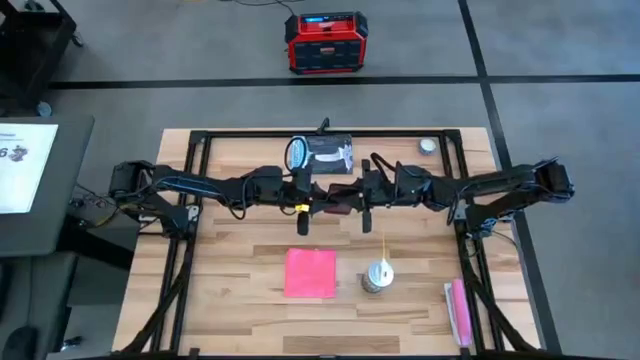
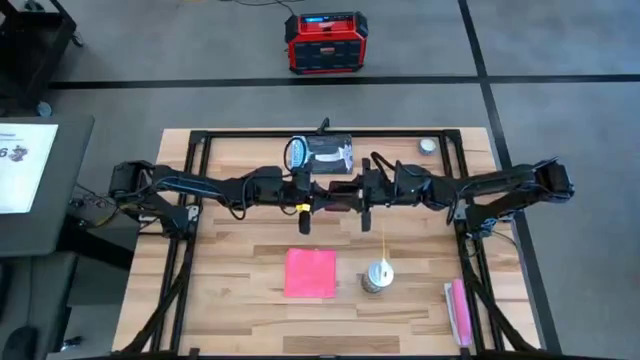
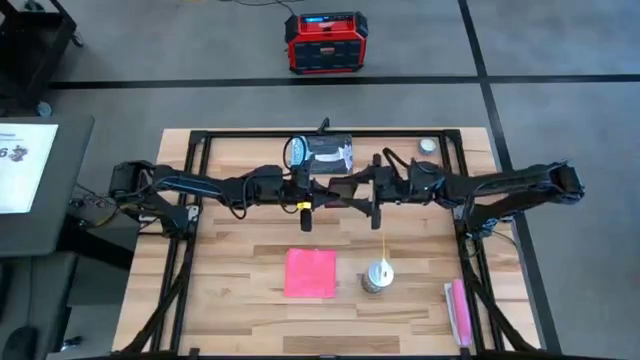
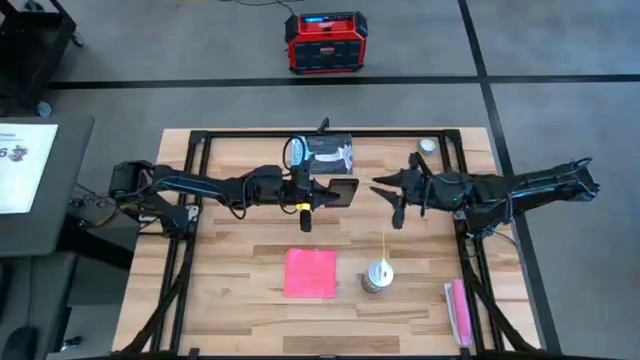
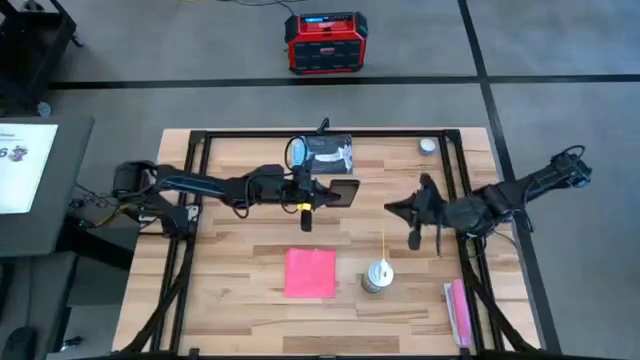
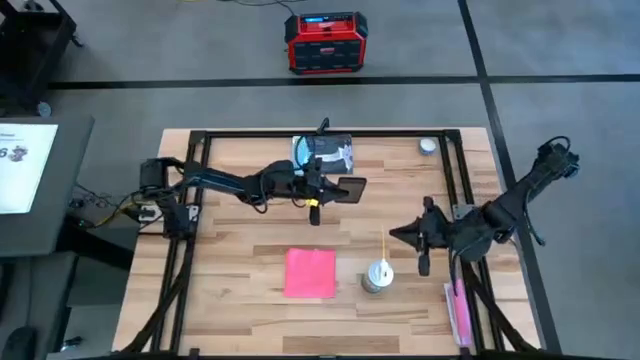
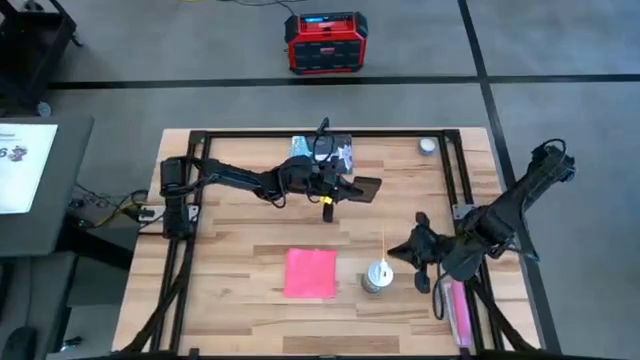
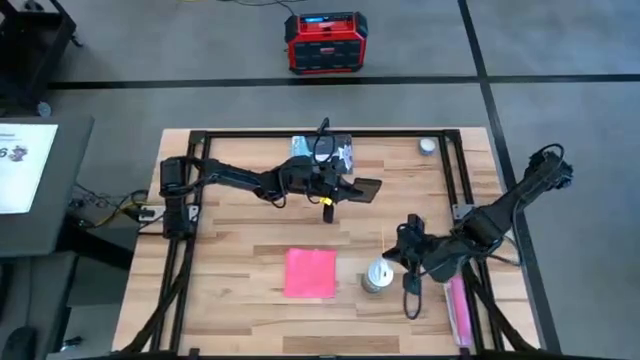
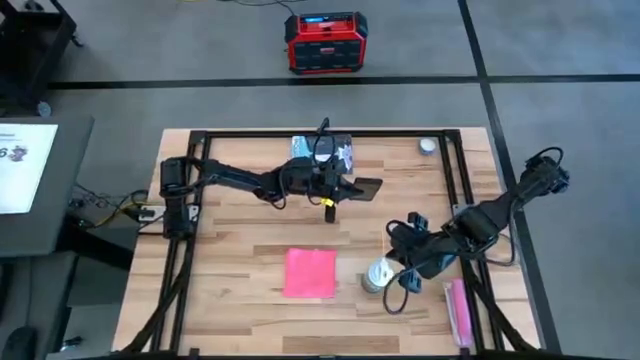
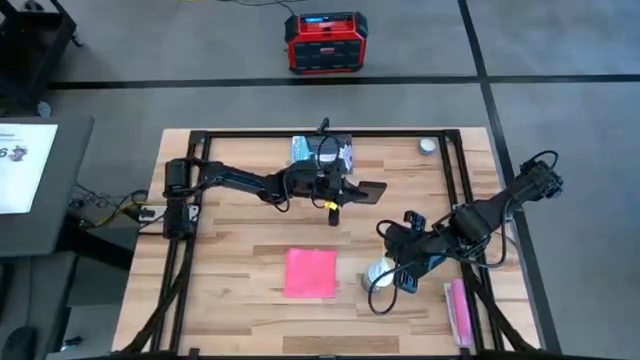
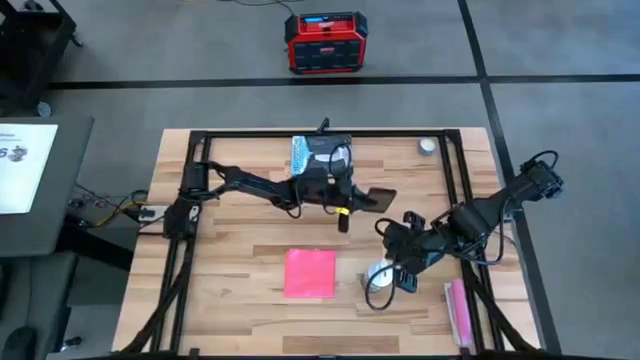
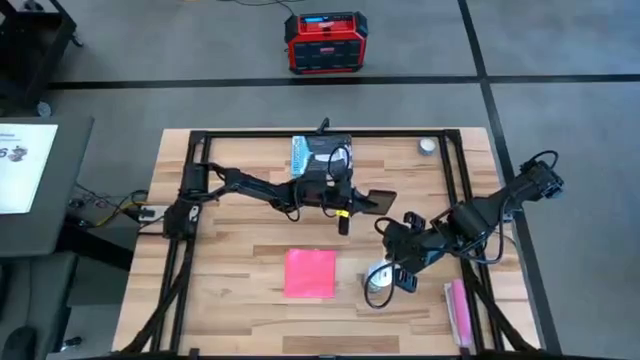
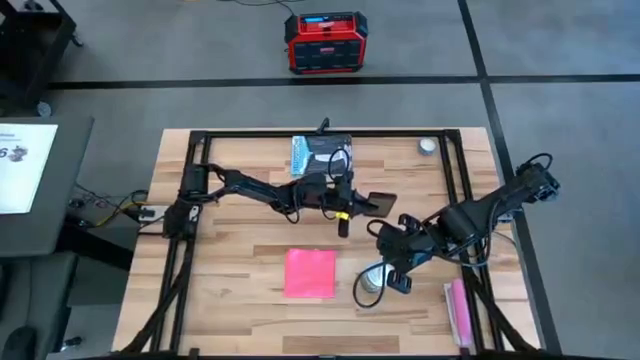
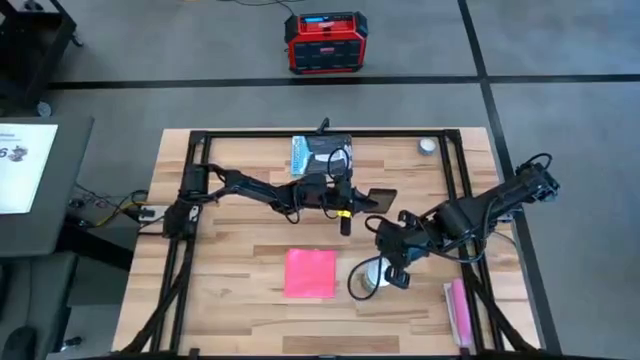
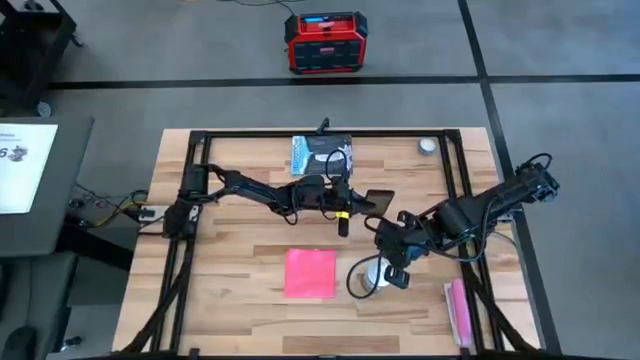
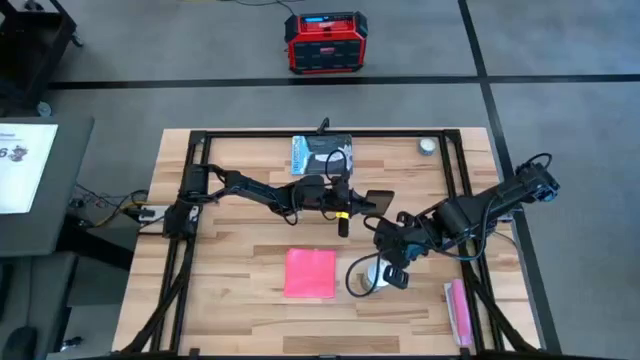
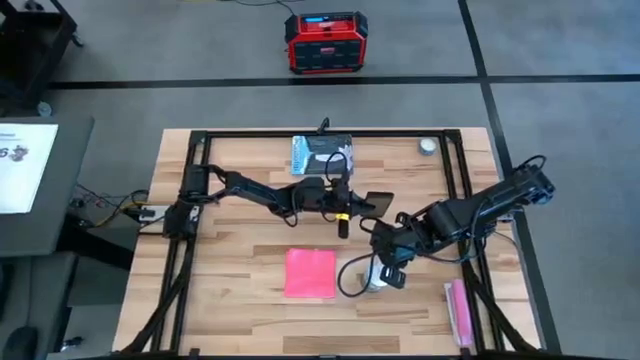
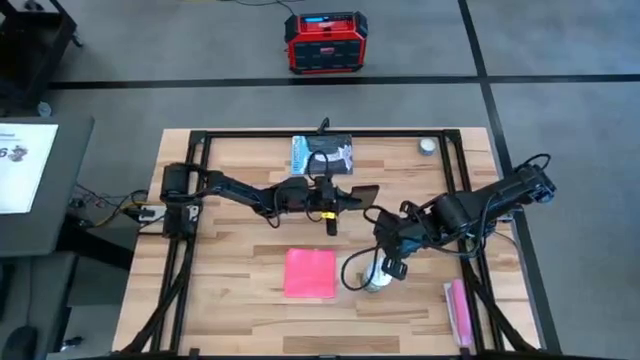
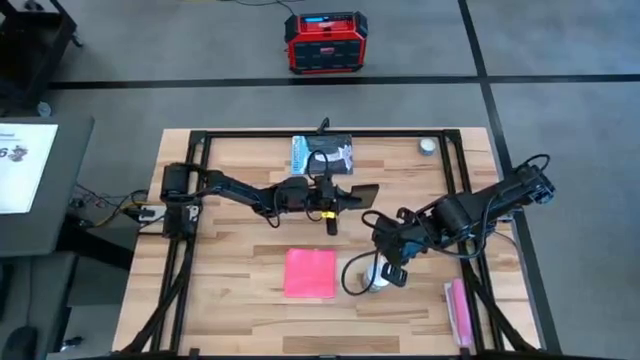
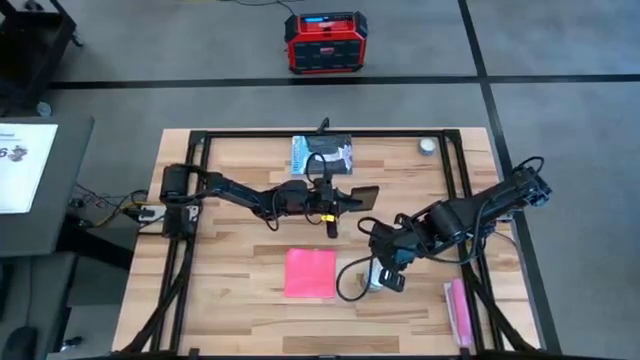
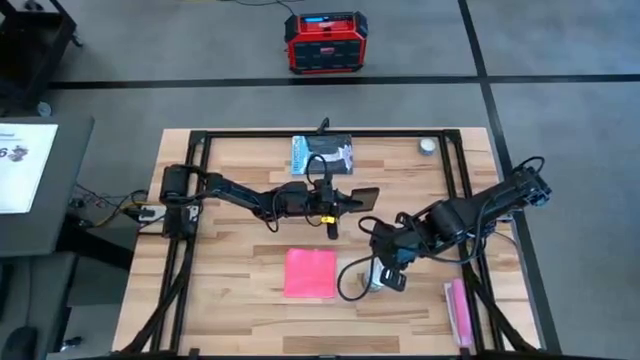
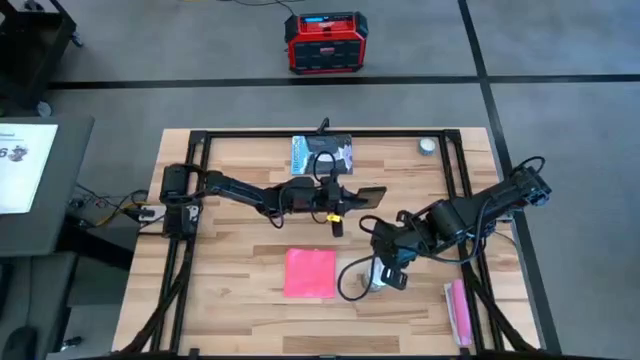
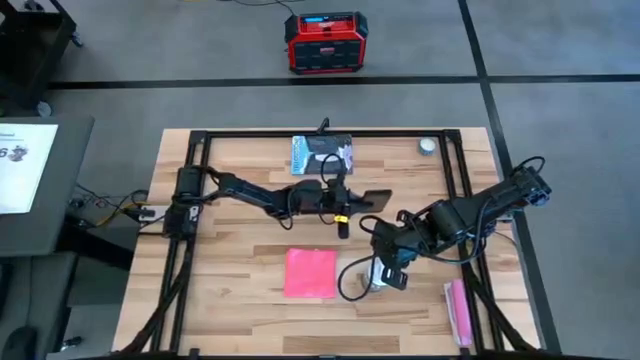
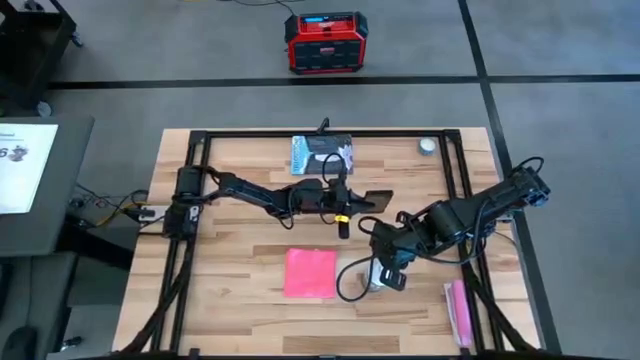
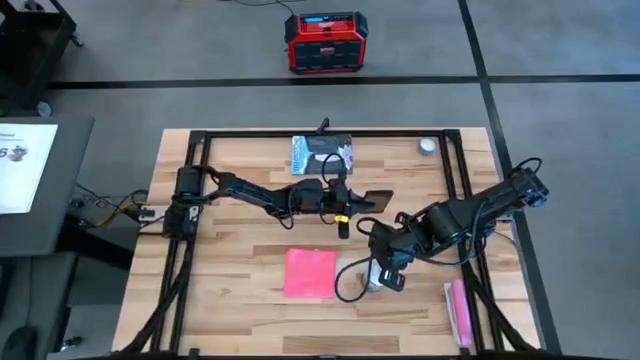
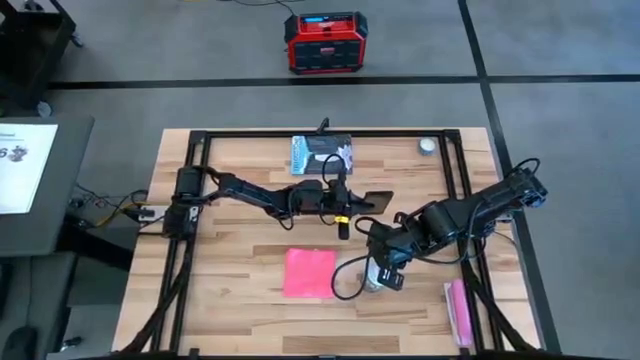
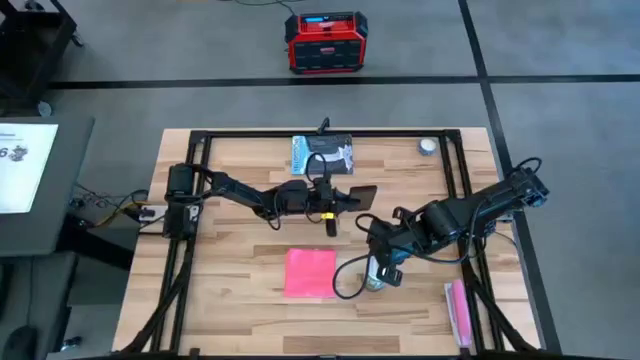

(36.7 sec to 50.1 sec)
Task: Apply microfiber cloth
Spray the front of the cellphone using the spray bottle
